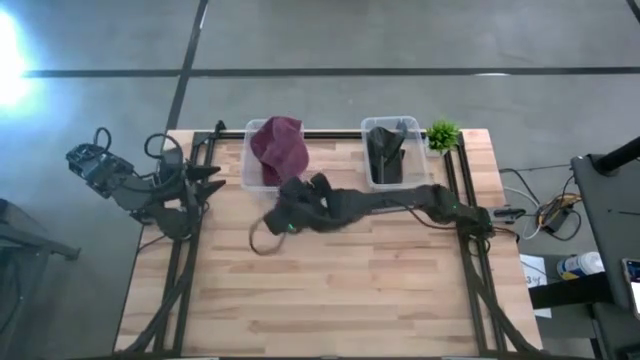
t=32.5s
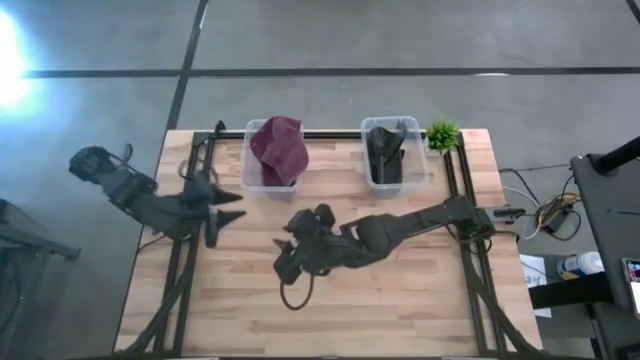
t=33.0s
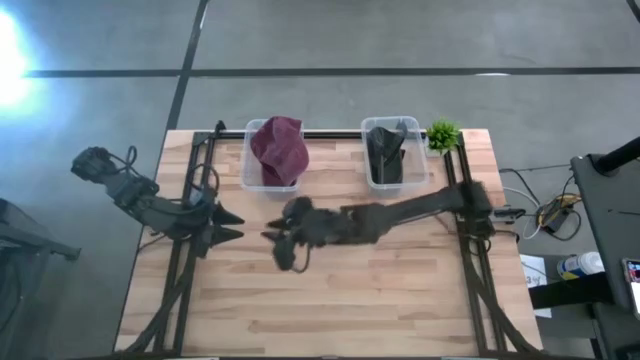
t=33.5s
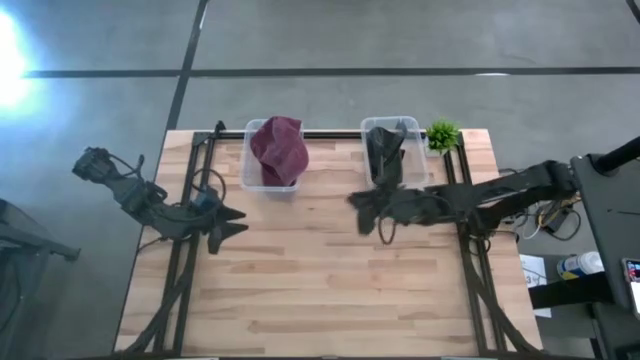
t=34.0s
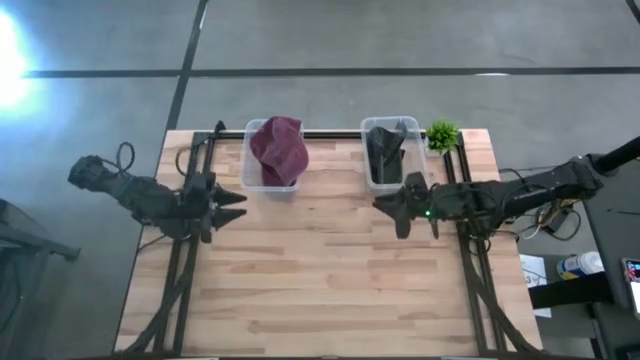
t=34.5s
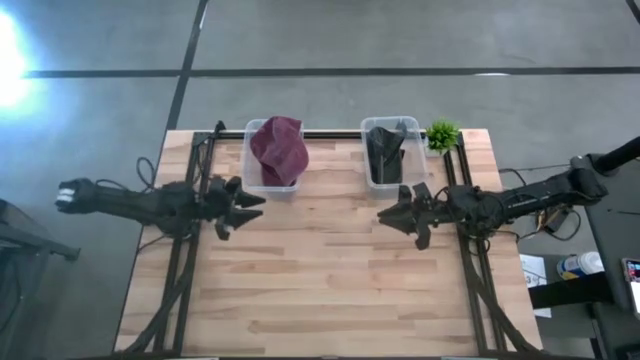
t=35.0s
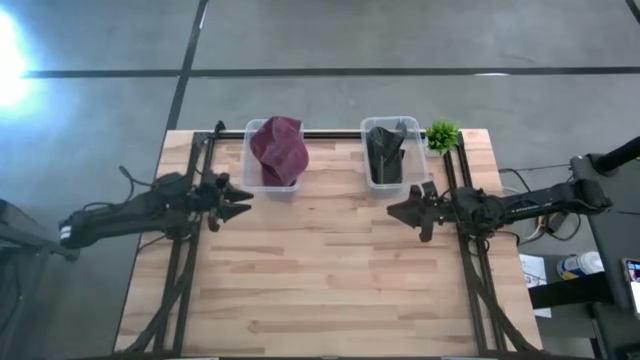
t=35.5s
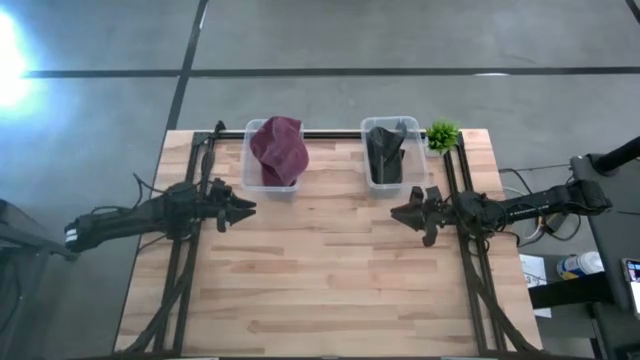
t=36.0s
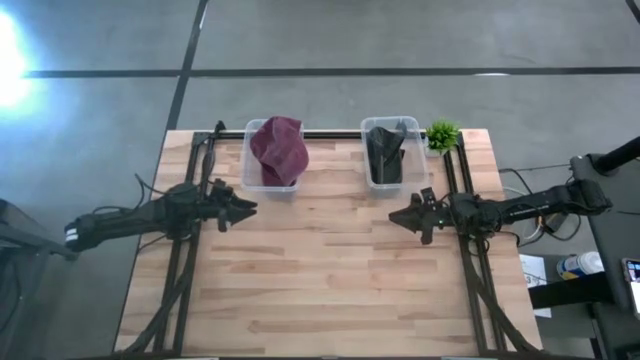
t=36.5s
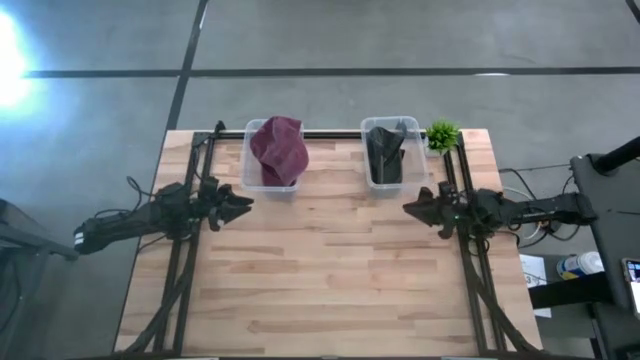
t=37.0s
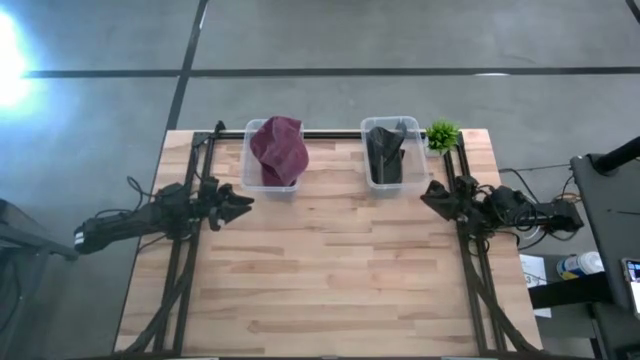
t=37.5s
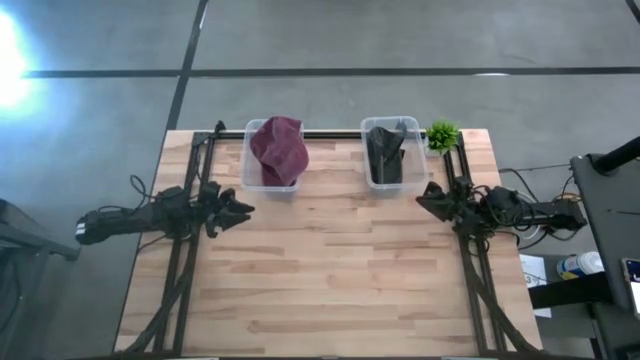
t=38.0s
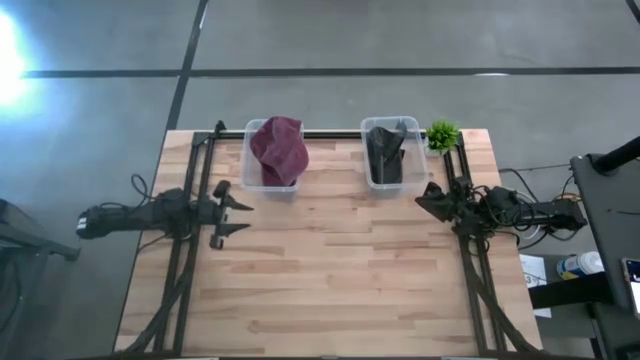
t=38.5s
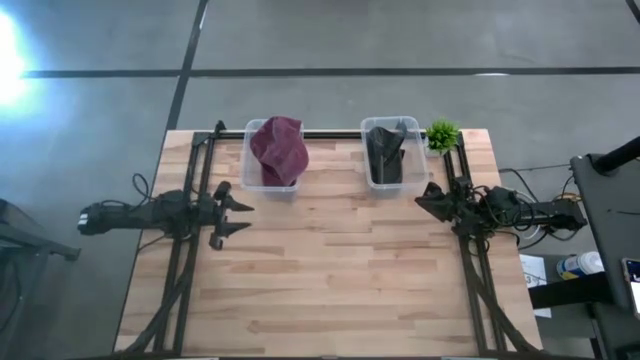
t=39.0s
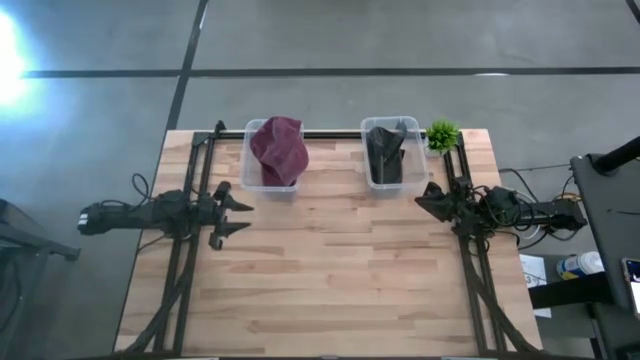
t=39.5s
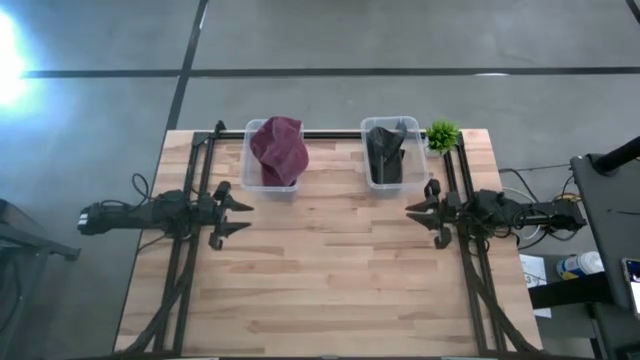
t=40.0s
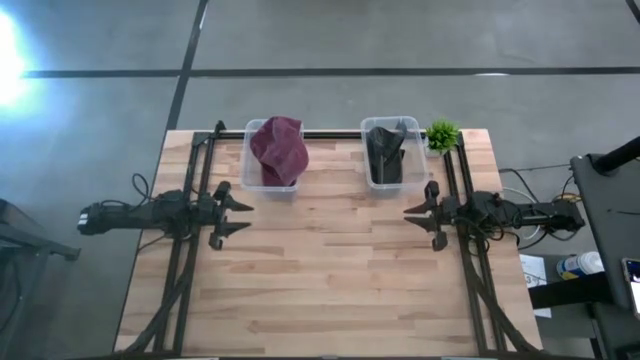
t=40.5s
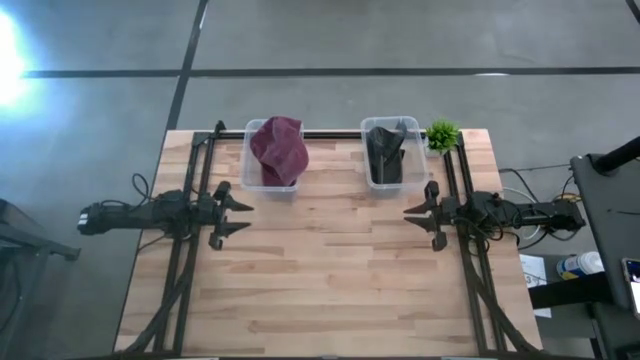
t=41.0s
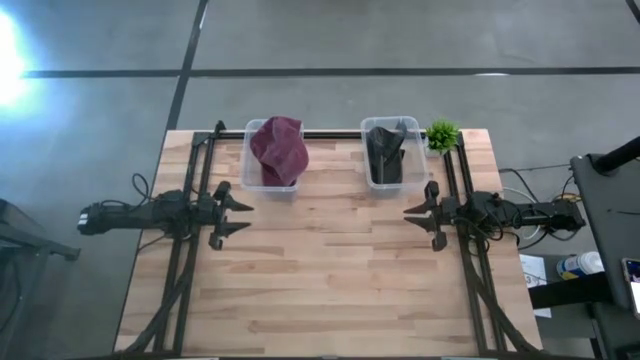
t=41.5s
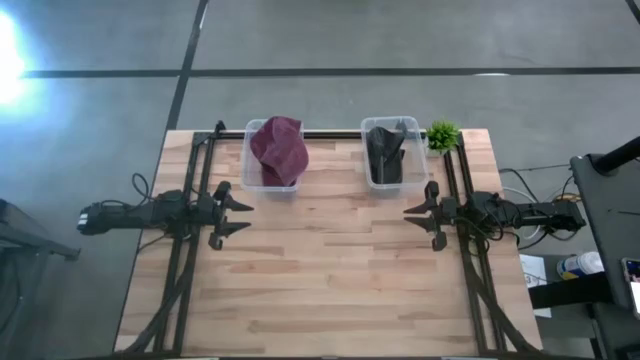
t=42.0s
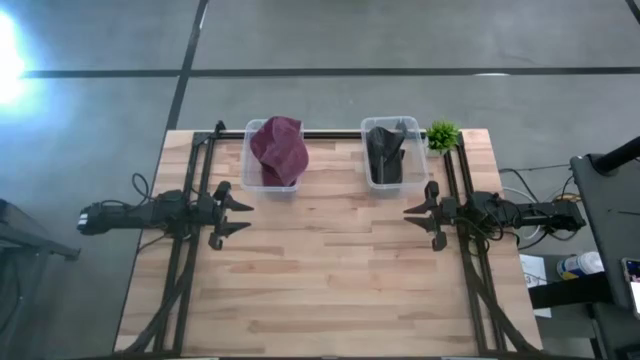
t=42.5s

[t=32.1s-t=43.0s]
Task: Pick & Place hat
Return to Home Position

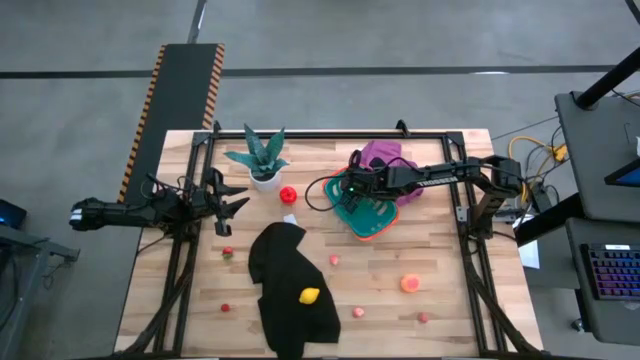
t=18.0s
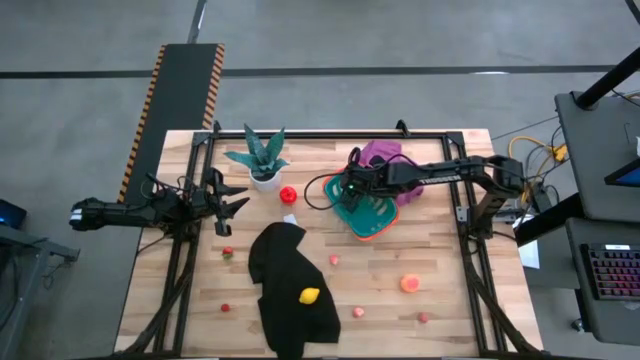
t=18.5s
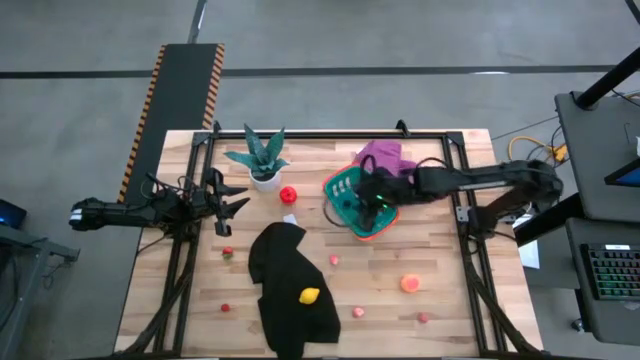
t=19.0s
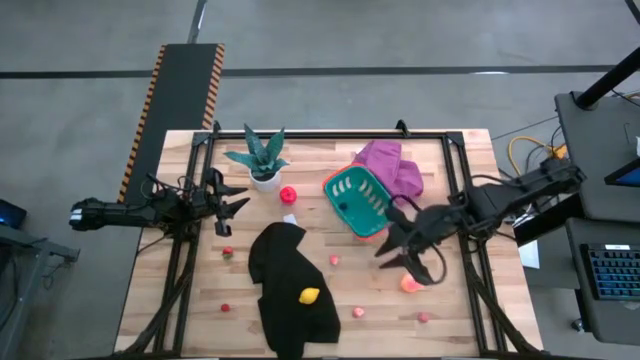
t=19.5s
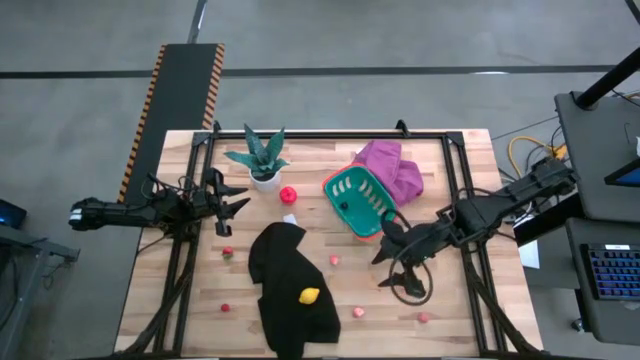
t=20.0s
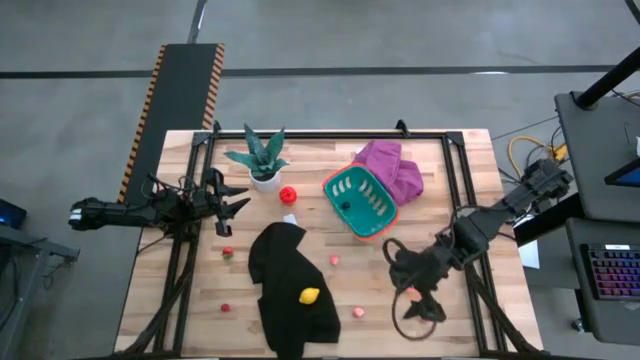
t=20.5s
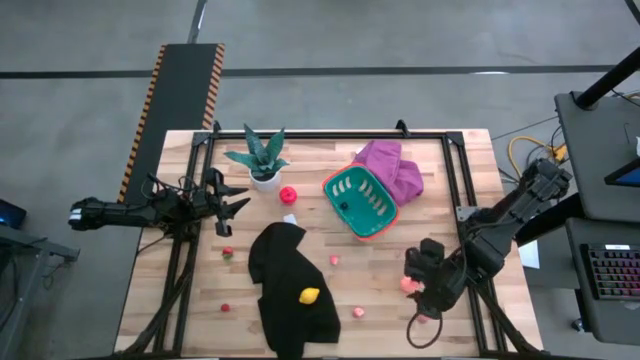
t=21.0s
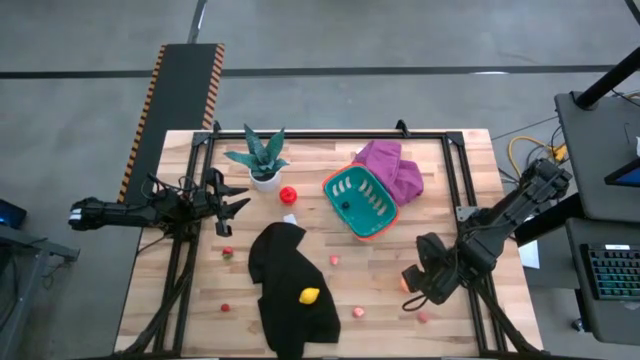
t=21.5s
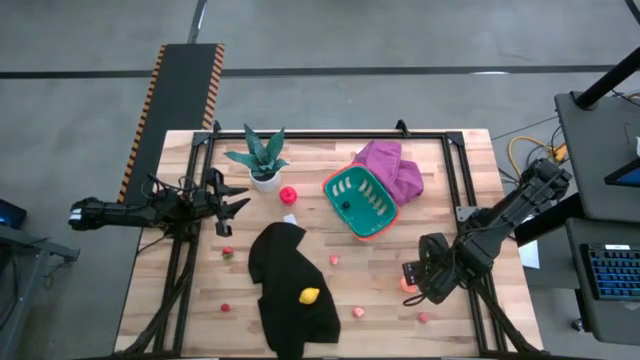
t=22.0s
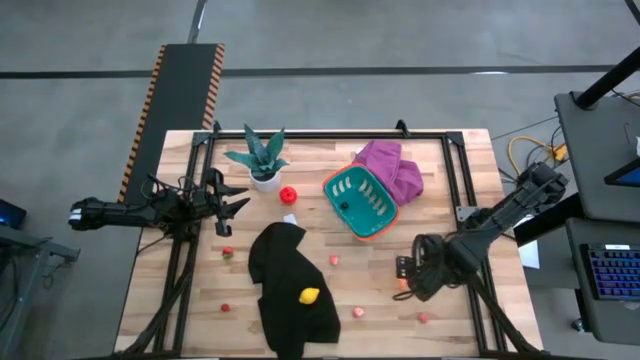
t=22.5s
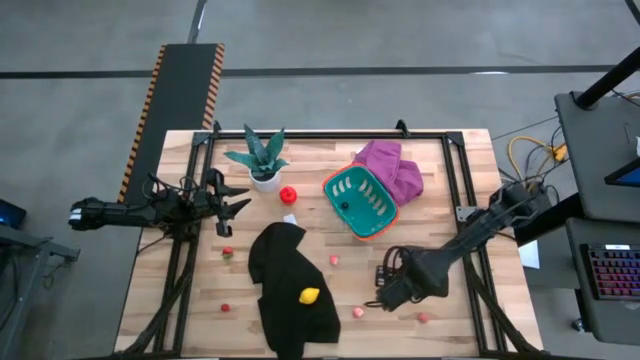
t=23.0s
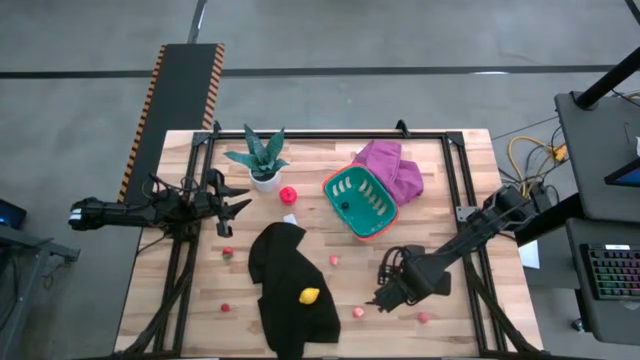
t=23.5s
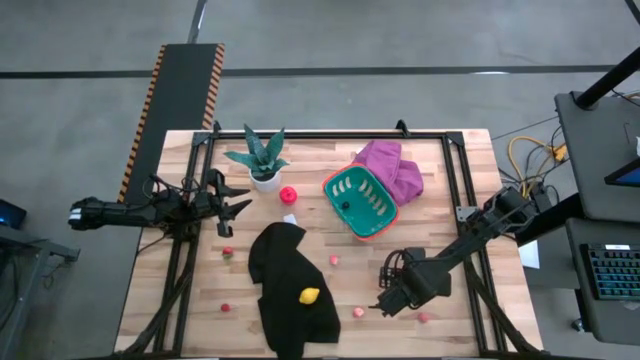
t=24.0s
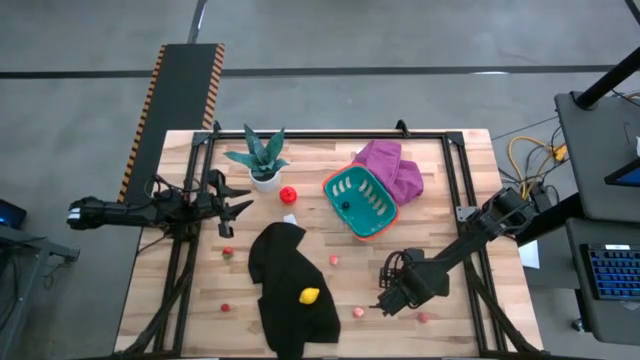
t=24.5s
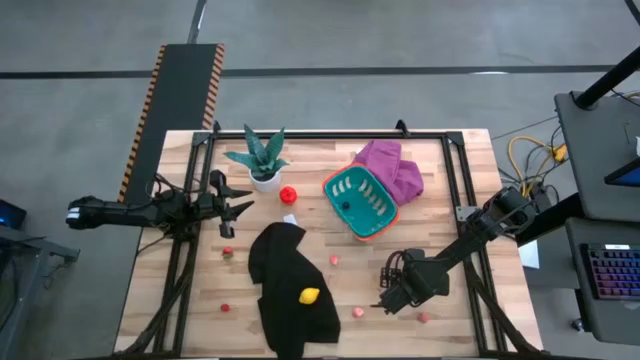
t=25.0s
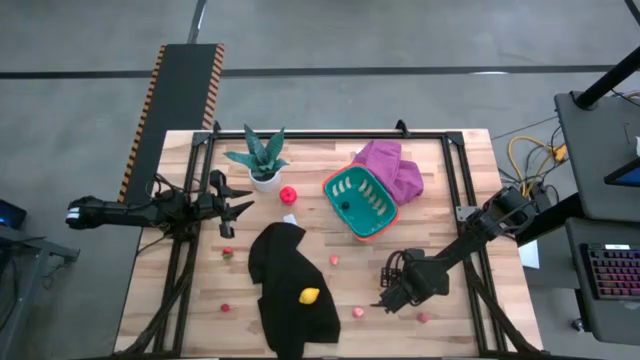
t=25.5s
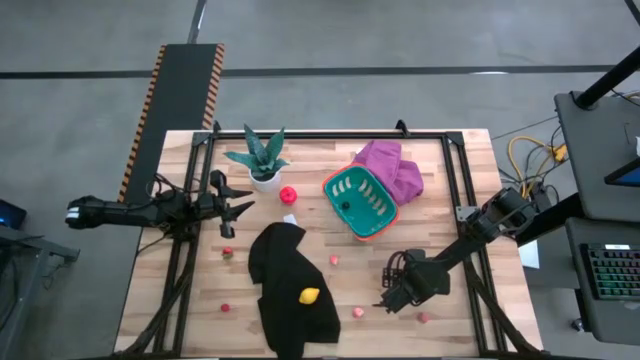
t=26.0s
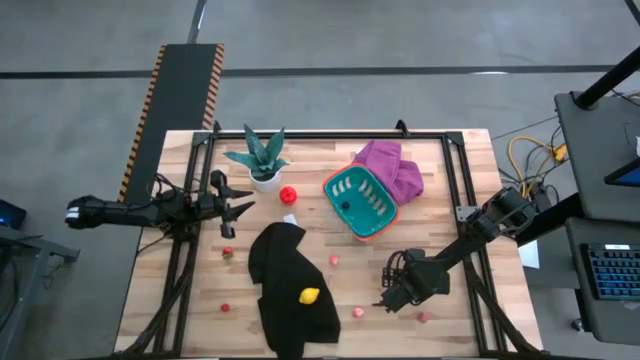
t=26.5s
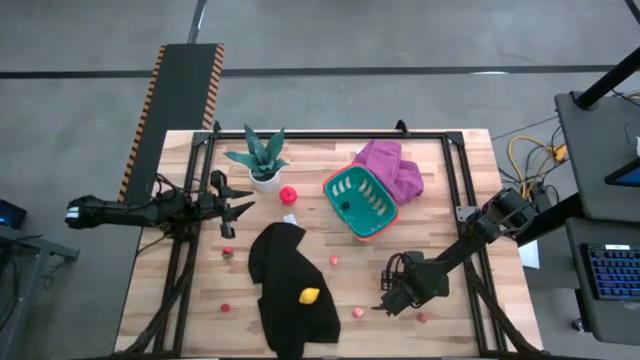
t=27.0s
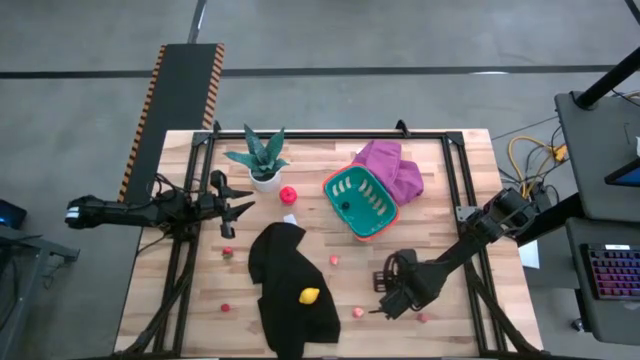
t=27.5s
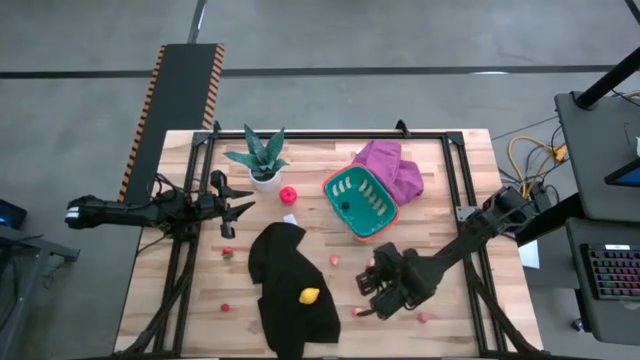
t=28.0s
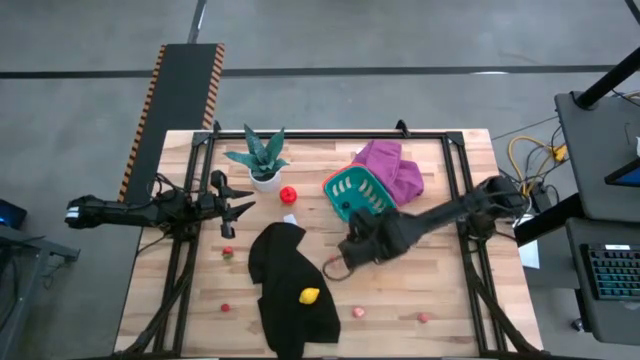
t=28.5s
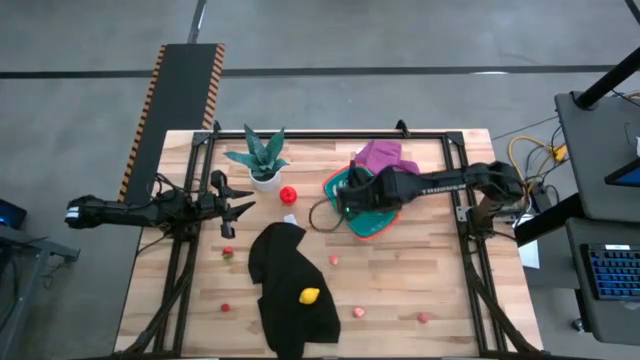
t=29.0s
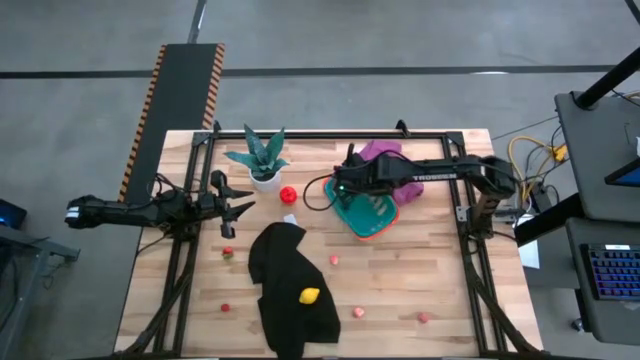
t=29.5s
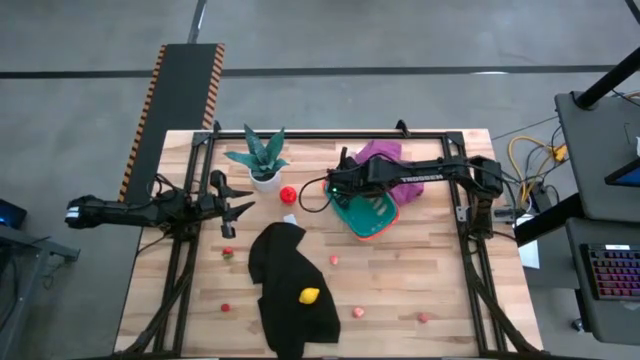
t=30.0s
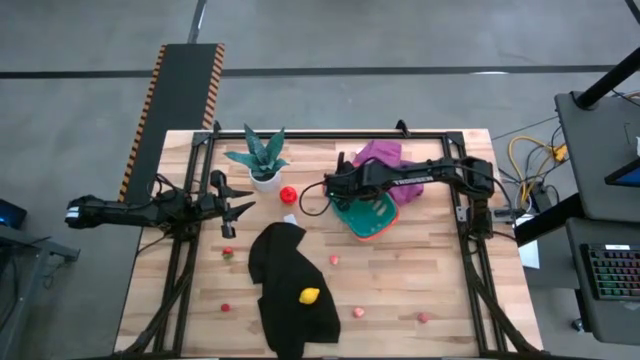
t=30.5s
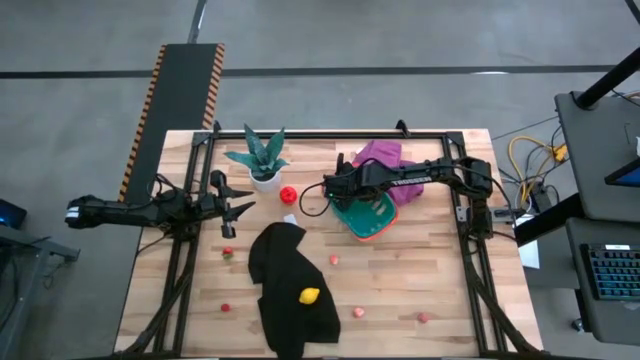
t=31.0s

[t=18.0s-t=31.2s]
Task: Pick and placing Produce into tupperware
Put the peach into the green basket
